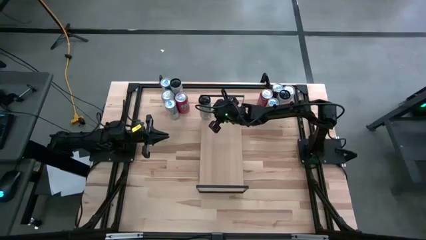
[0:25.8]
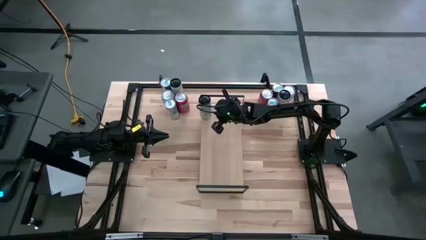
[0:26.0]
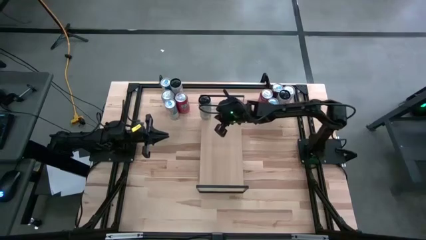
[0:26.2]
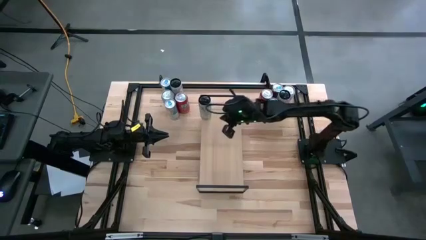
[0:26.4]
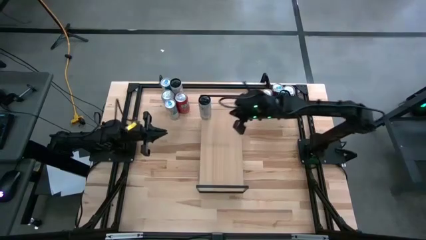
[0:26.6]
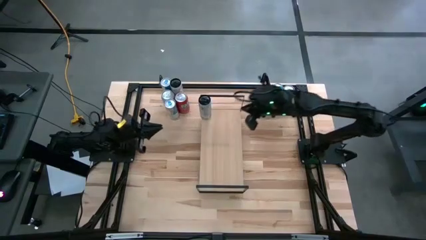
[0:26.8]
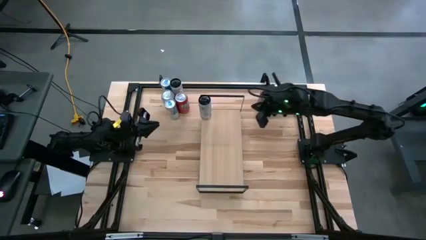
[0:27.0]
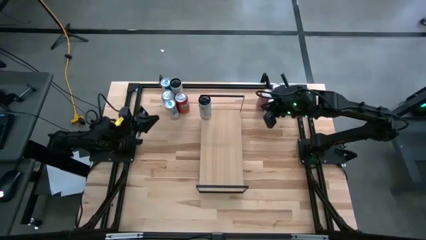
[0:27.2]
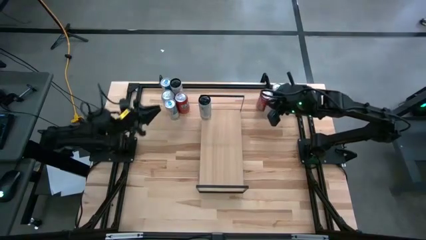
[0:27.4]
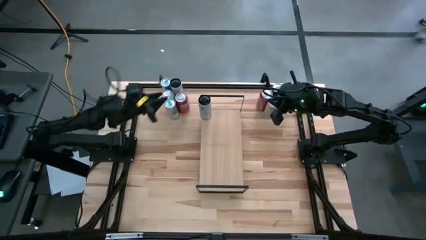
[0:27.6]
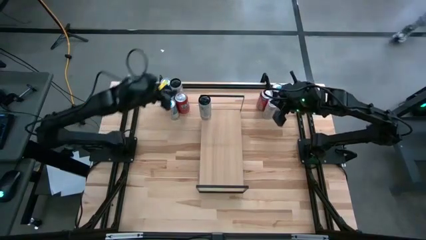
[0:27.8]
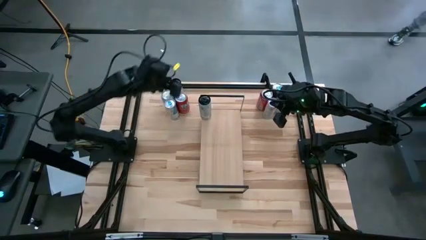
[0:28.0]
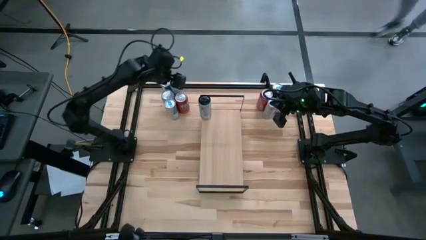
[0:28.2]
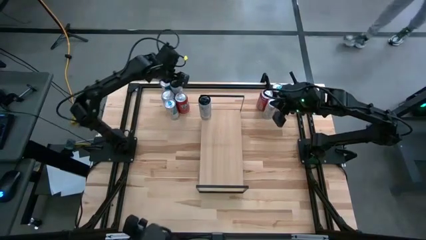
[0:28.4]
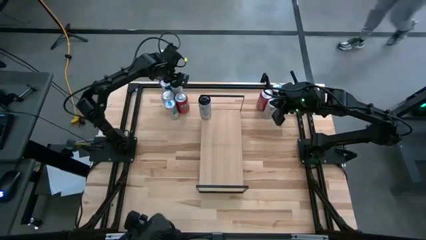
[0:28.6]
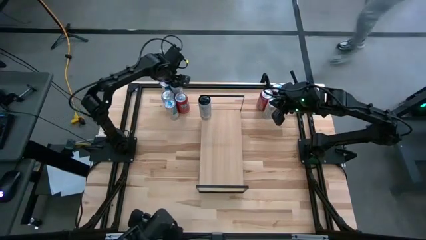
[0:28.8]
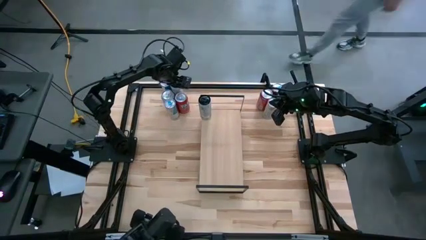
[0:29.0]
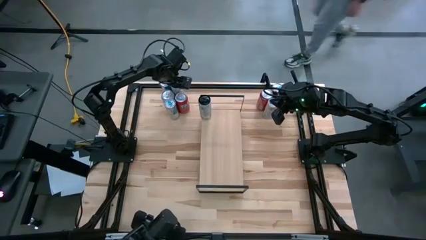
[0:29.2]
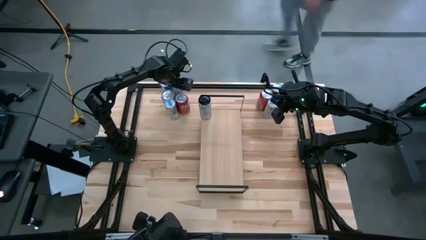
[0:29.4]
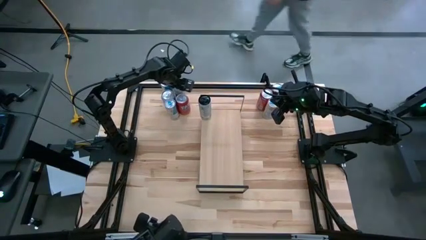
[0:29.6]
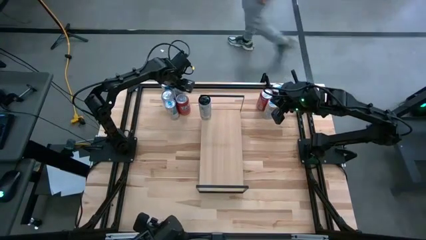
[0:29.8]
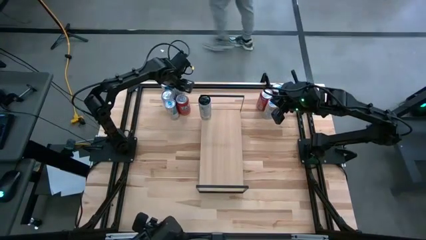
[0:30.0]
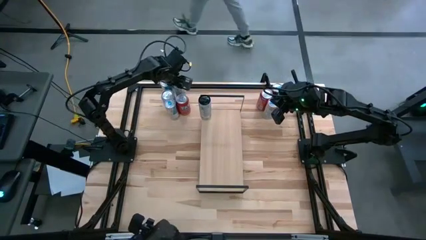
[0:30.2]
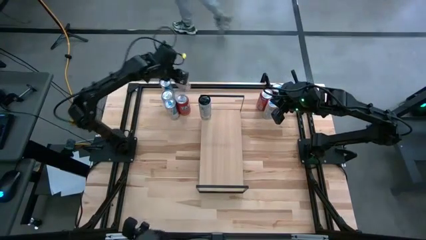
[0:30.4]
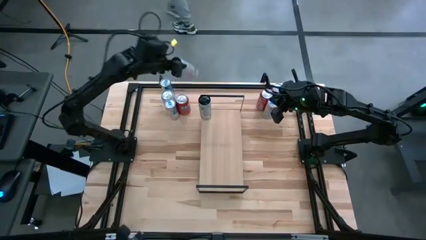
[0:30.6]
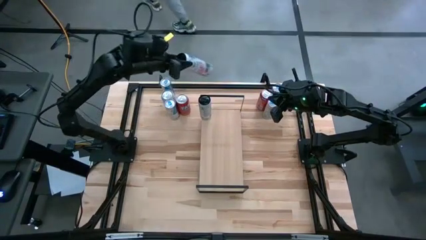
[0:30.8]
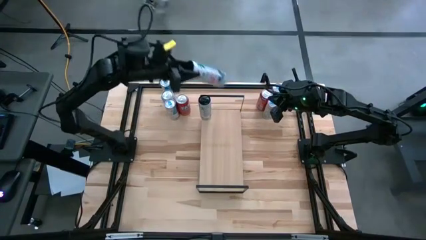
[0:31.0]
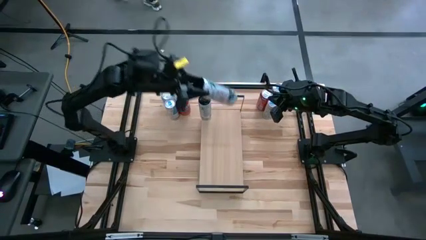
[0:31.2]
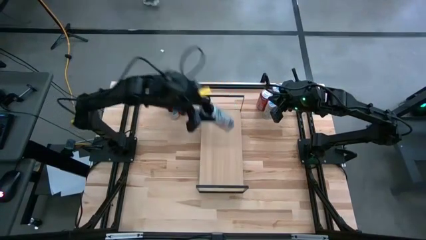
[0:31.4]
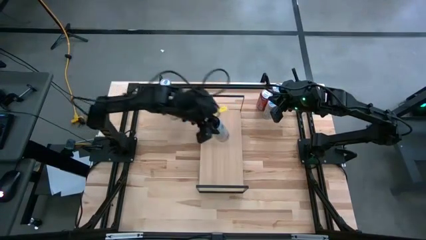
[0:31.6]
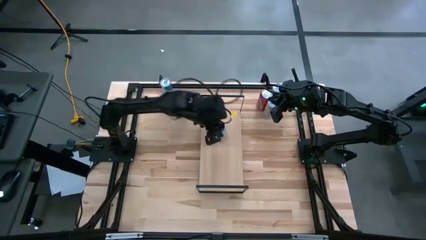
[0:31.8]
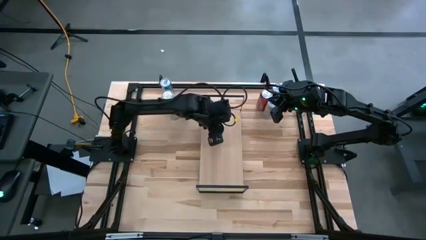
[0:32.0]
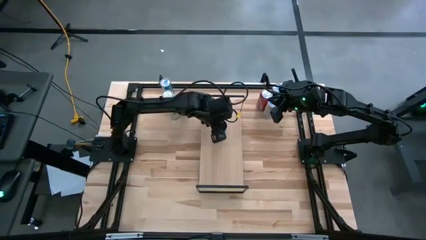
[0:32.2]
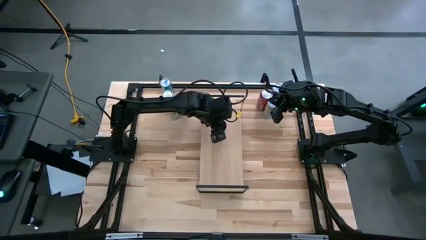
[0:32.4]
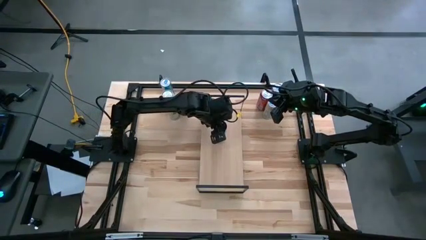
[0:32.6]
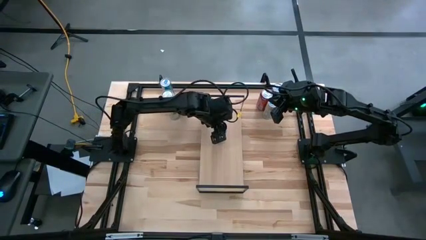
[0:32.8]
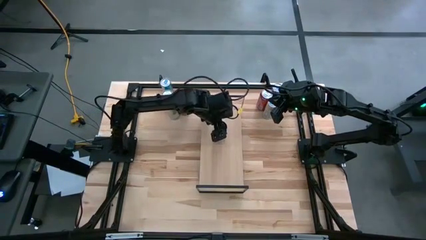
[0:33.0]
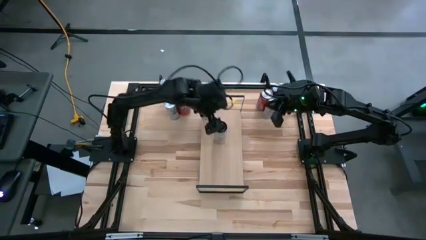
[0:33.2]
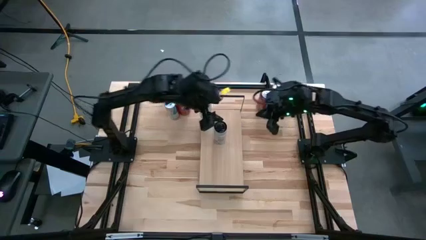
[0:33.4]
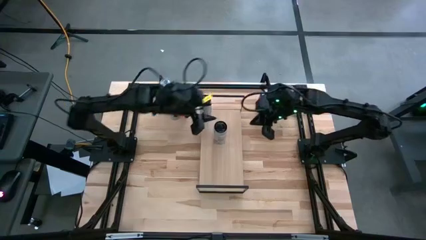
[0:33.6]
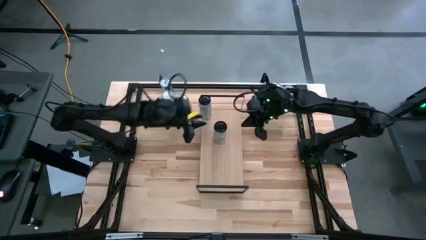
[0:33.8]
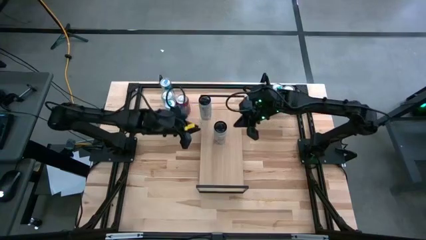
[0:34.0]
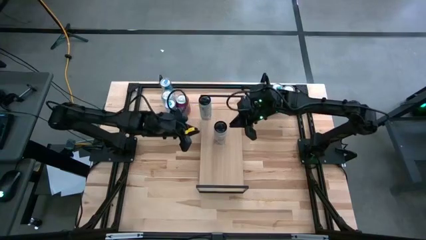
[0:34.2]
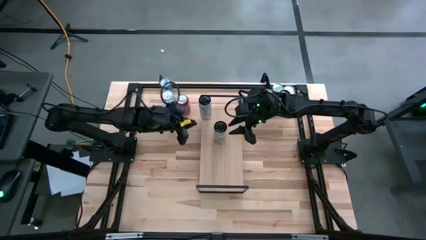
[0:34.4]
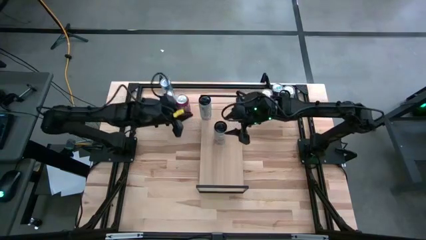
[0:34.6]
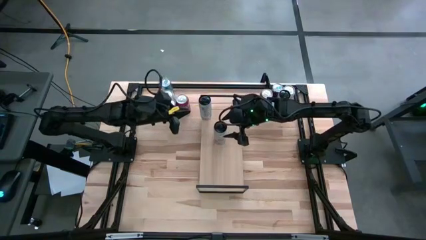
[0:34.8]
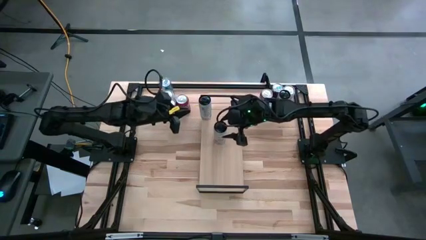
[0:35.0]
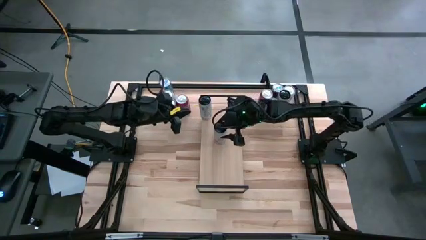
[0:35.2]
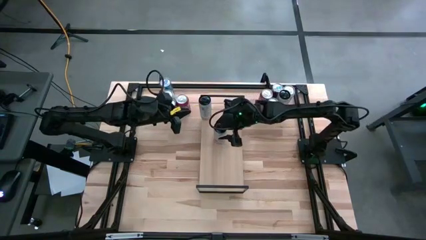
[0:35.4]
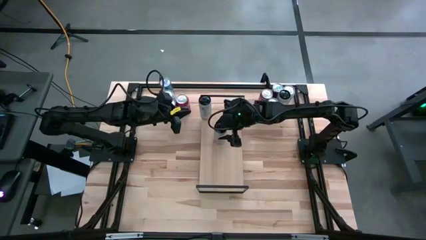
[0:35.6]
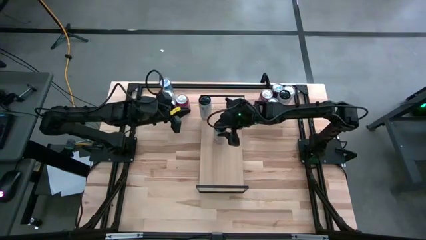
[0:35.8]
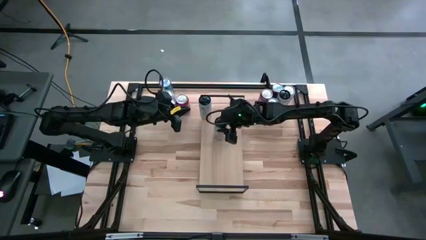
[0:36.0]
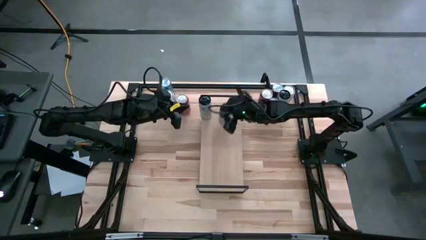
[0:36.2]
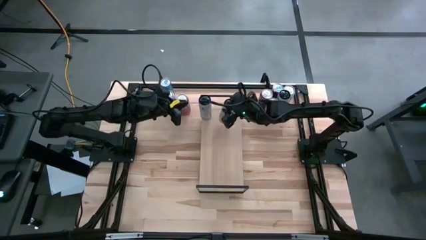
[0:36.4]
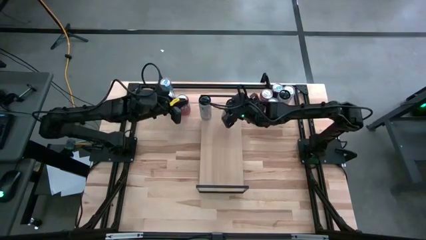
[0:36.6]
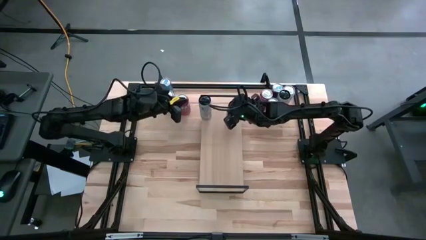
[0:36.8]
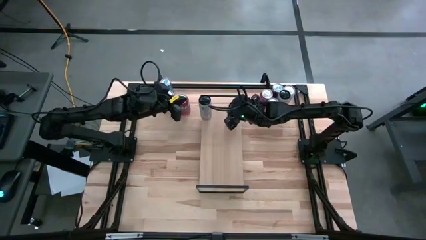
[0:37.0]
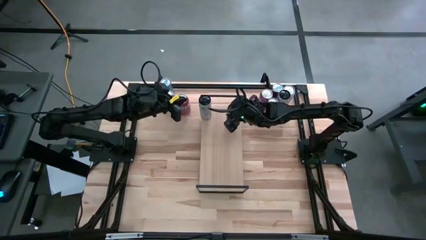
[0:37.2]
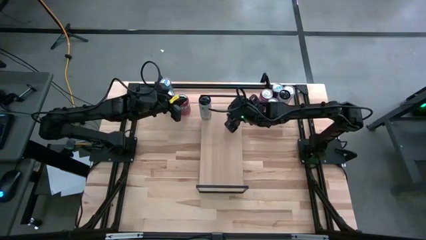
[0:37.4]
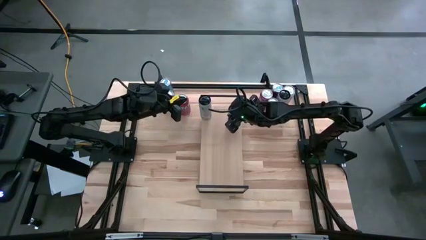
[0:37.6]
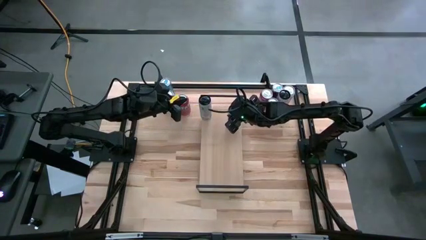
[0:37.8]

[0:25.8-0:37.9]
Task: Place canned beverage on shelf
Put the left white-pink soda can on the shelf aligned with the other white-pink soda can

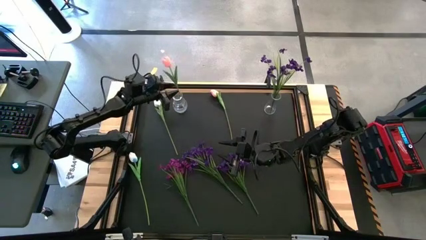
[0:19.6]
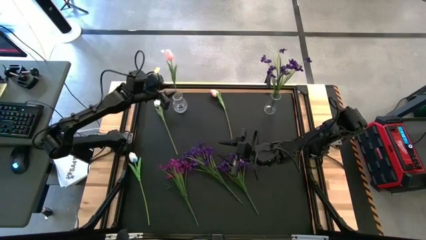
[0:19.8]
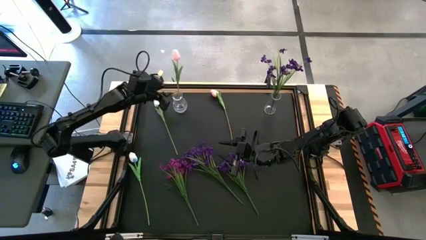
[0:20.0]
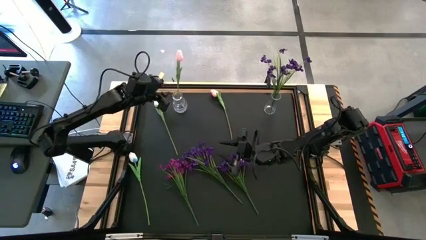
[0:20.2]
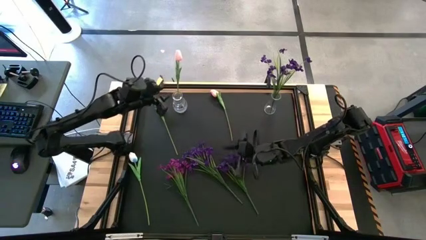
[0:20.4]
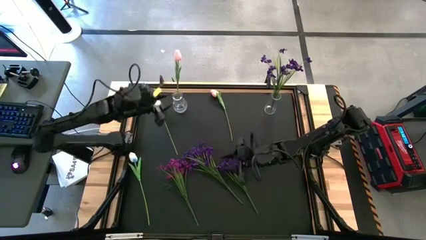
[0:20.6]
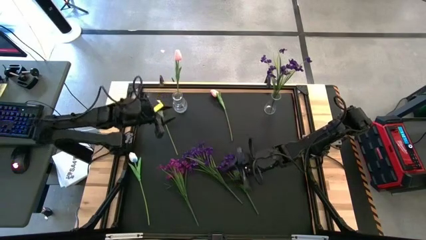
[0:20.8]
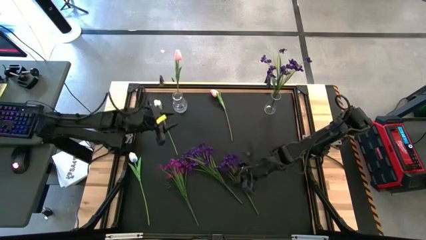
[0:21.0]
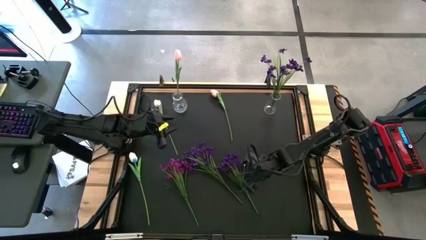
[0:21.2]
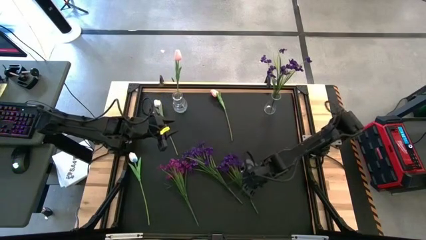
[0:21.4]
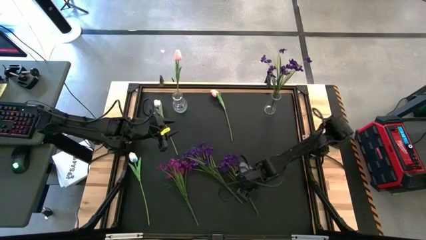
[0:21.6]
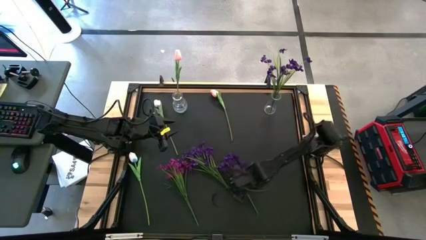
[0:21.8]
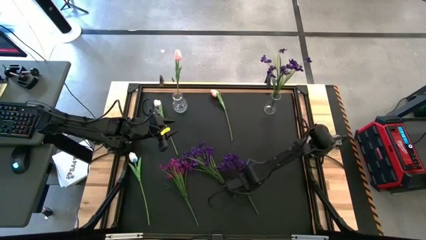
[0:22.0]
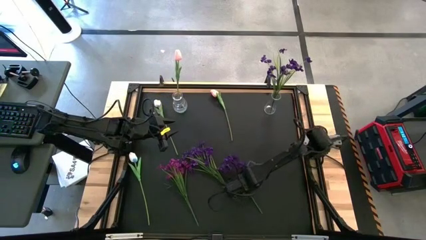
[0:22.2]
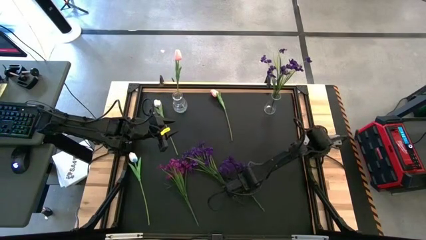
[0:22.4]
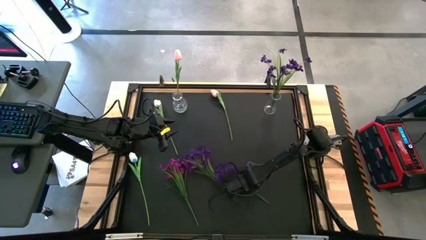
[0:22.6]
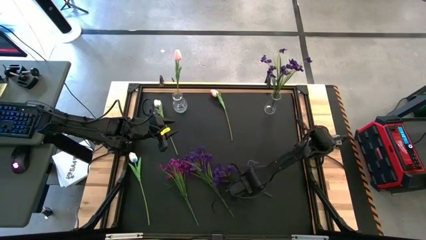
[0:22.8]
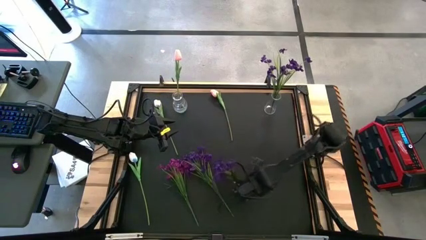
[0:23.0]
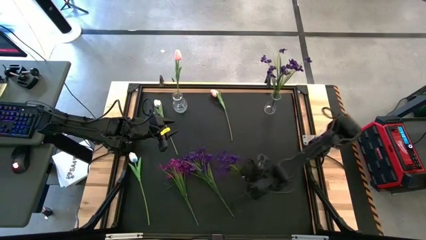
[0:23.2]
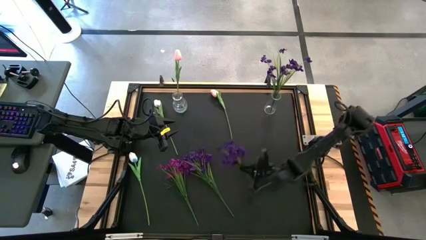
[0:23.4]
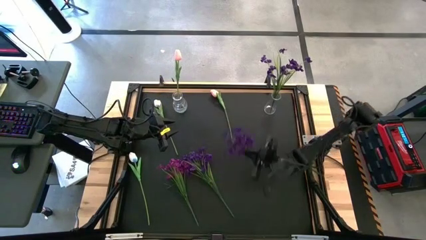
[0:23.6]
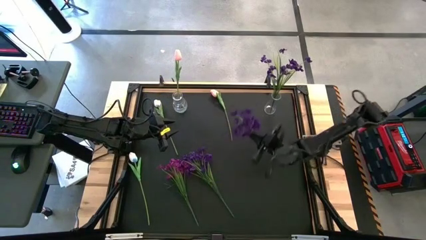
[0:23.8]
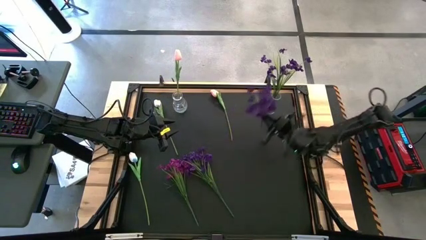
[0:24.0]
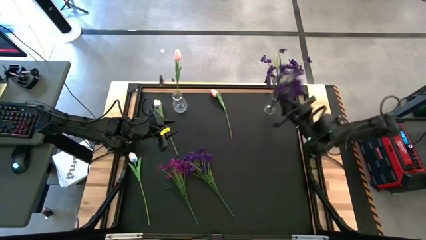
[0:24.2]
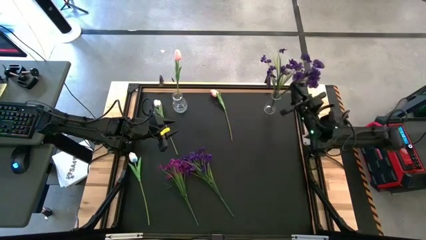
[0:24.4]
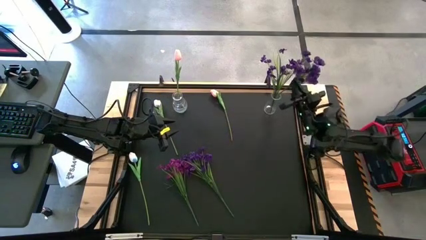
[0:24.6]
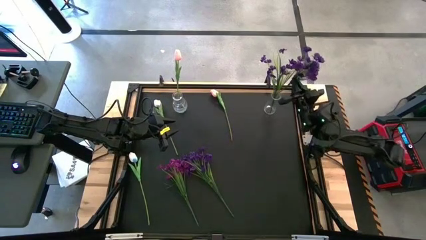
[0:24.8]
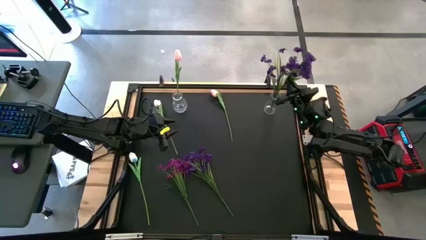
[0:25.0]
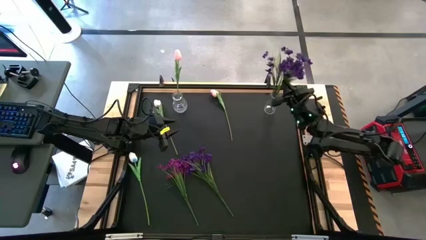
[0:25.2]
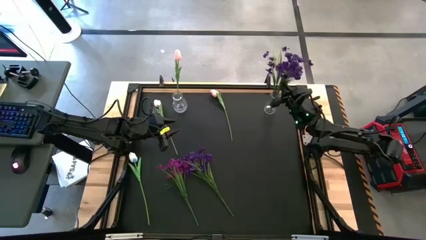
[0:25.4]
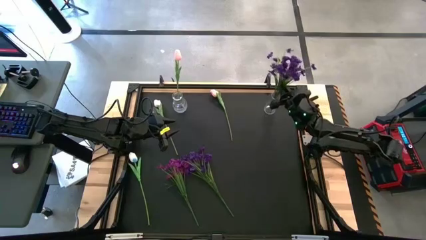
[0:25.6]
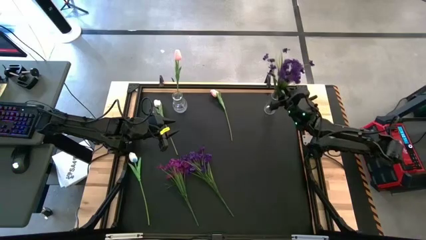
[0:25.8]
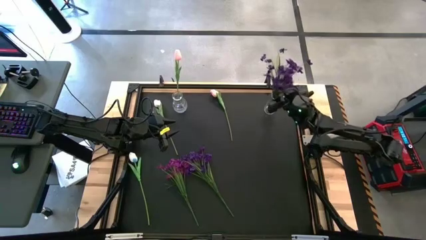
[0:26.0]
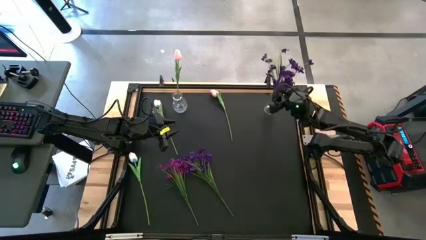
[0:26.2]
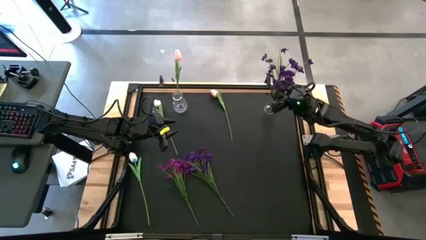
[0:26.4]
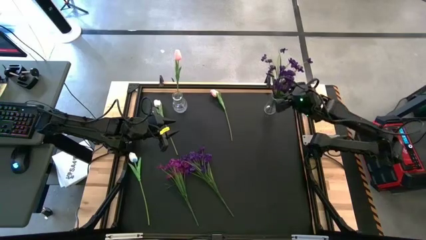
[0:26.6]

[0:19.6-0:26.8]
Task: Sort flowers into vase by color
Put the bottom purple flowers into the right transparent vase
